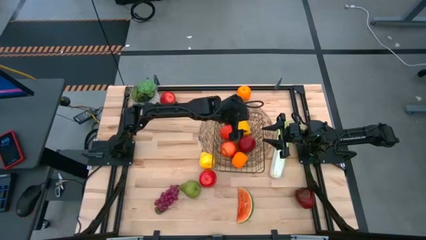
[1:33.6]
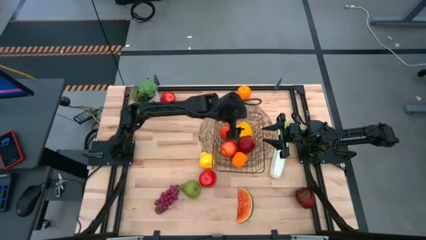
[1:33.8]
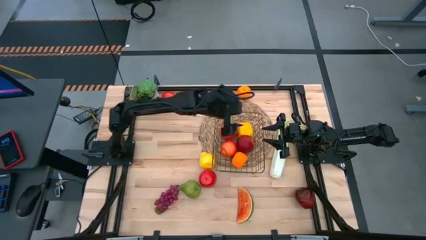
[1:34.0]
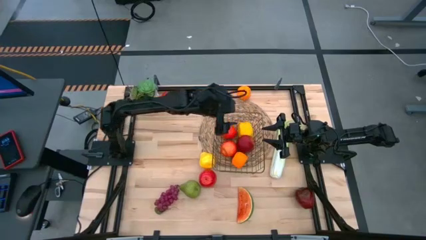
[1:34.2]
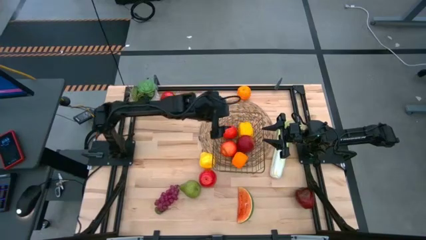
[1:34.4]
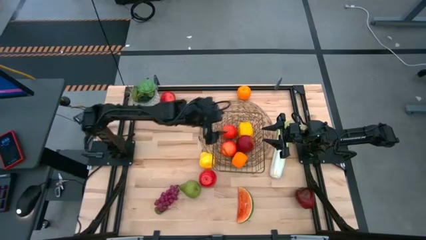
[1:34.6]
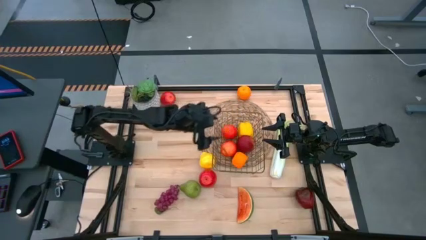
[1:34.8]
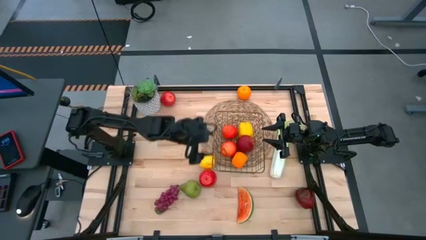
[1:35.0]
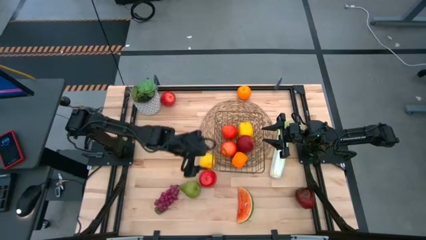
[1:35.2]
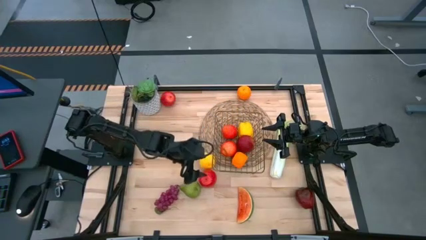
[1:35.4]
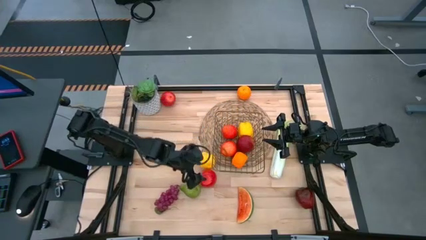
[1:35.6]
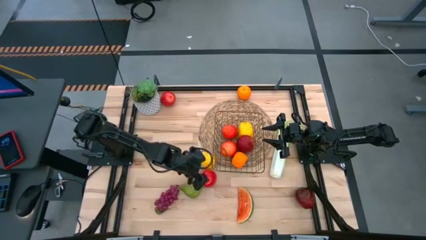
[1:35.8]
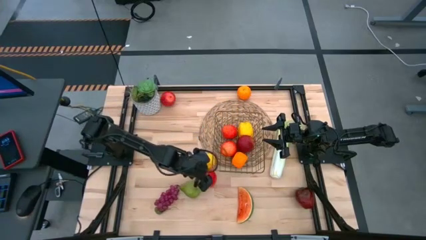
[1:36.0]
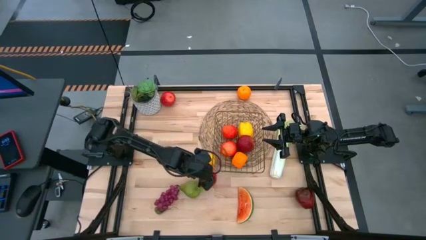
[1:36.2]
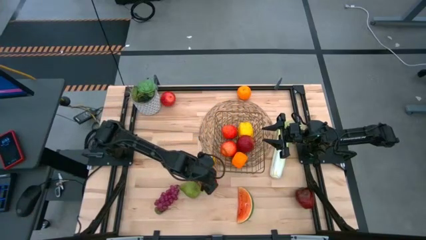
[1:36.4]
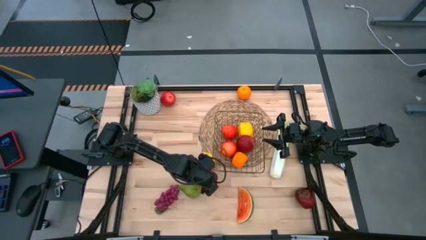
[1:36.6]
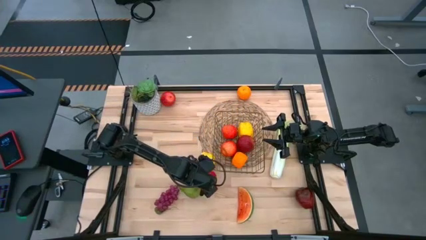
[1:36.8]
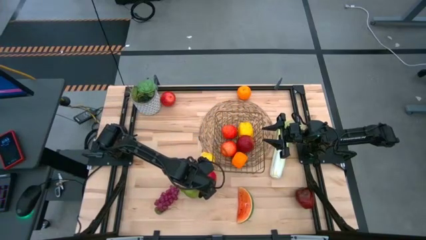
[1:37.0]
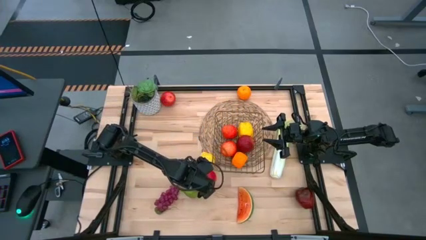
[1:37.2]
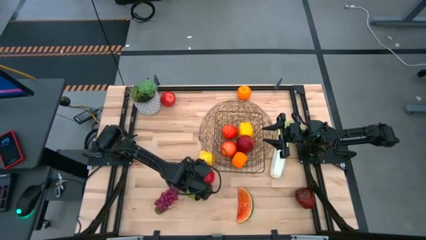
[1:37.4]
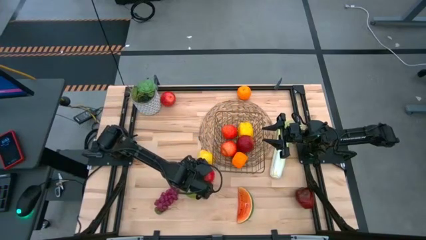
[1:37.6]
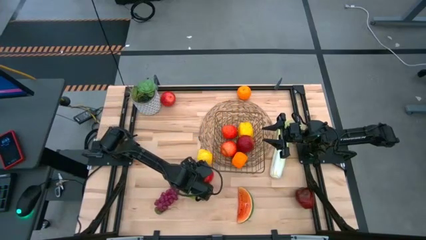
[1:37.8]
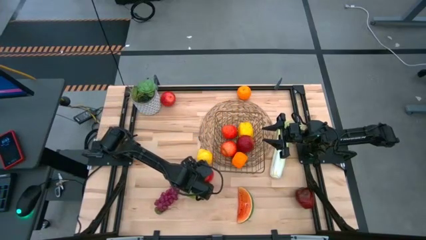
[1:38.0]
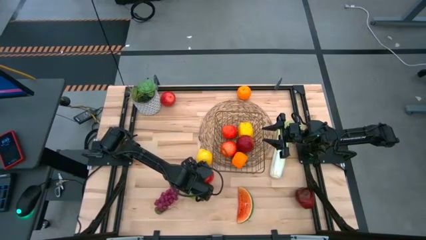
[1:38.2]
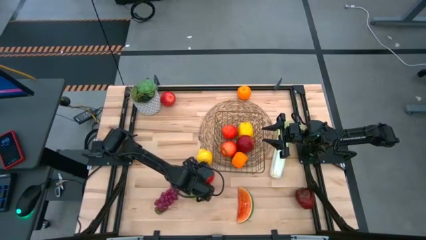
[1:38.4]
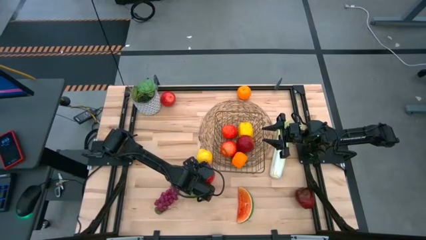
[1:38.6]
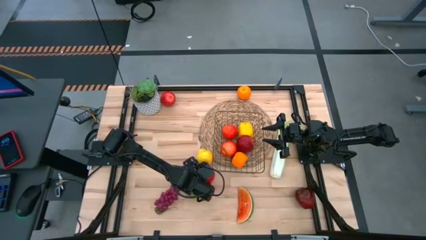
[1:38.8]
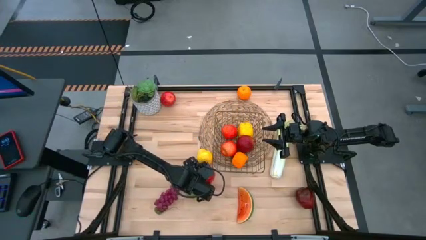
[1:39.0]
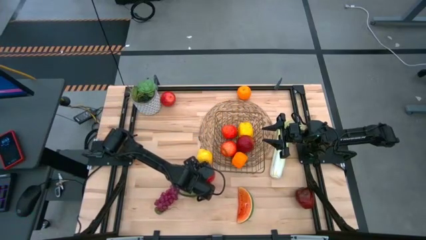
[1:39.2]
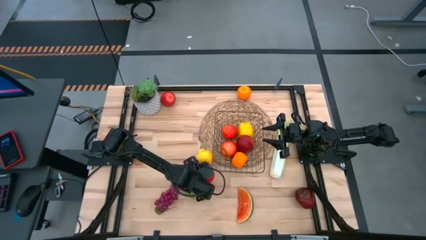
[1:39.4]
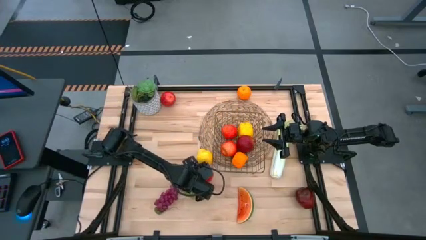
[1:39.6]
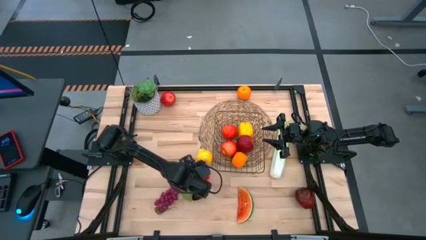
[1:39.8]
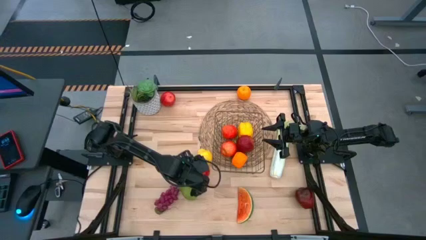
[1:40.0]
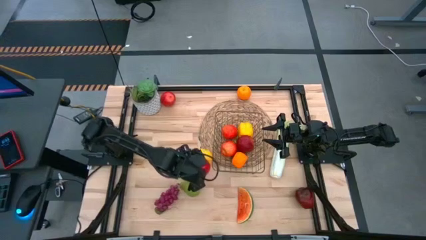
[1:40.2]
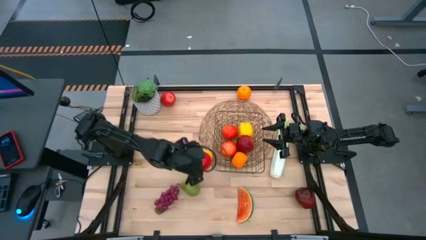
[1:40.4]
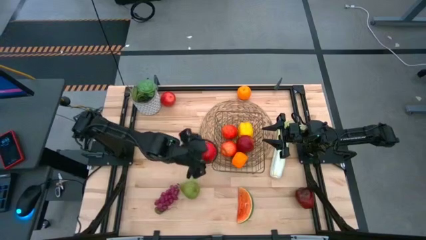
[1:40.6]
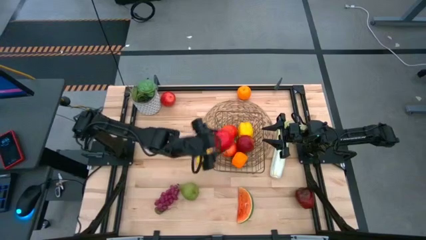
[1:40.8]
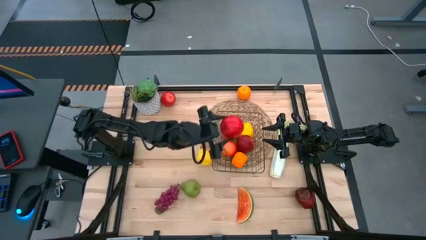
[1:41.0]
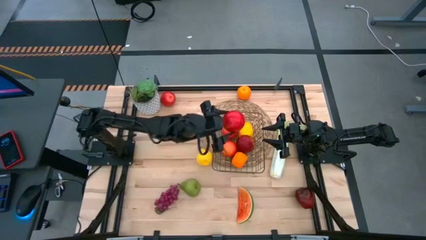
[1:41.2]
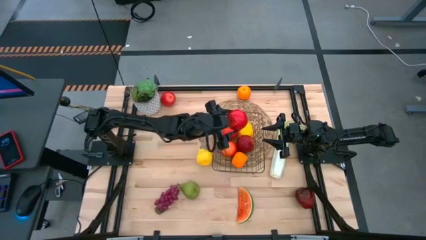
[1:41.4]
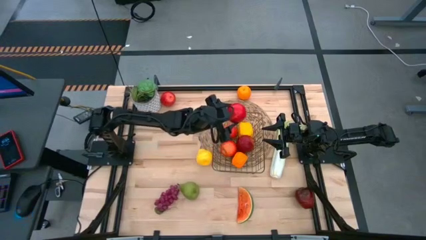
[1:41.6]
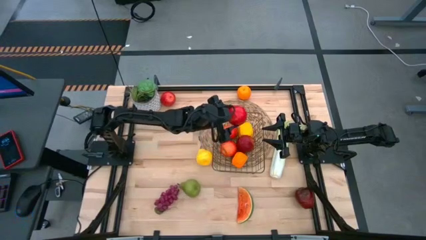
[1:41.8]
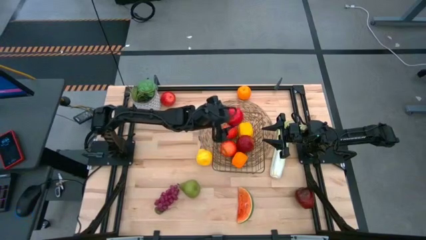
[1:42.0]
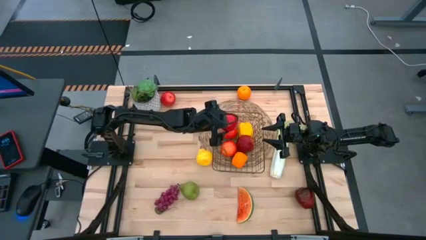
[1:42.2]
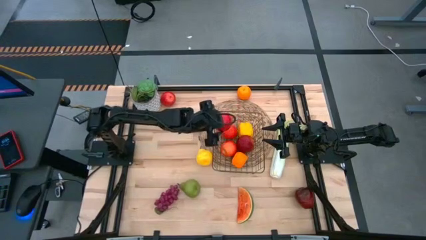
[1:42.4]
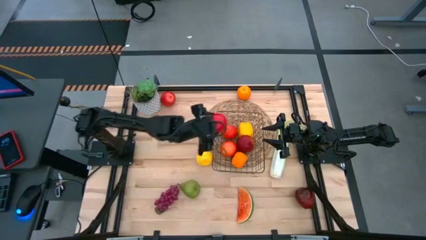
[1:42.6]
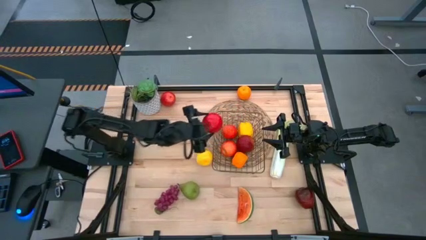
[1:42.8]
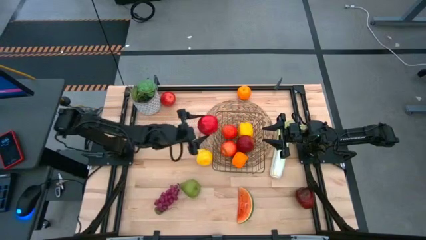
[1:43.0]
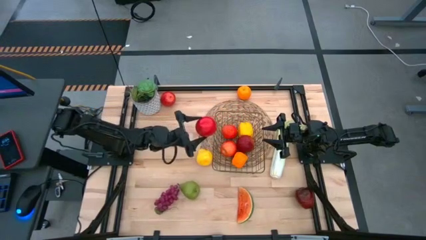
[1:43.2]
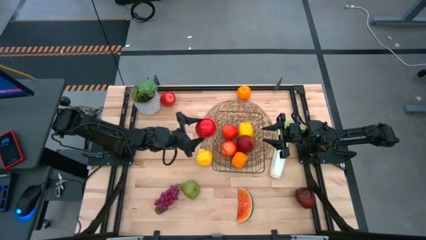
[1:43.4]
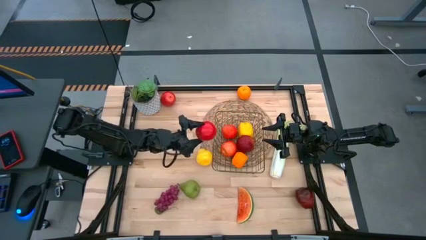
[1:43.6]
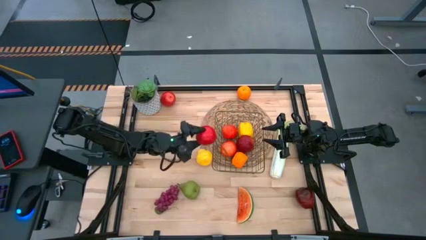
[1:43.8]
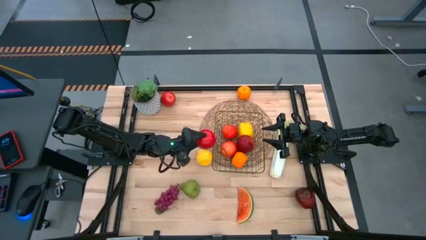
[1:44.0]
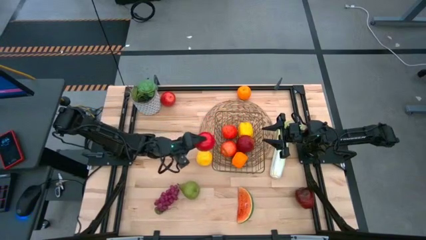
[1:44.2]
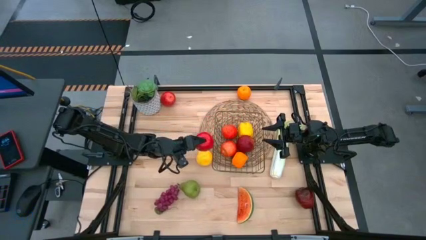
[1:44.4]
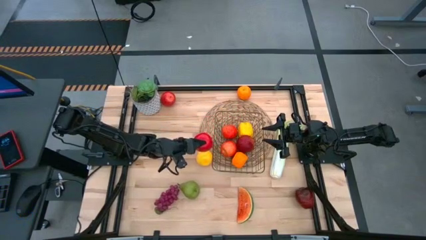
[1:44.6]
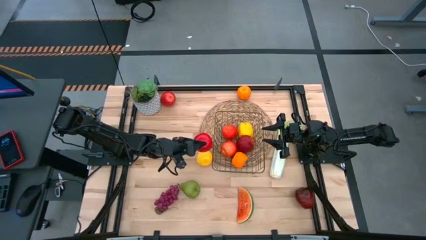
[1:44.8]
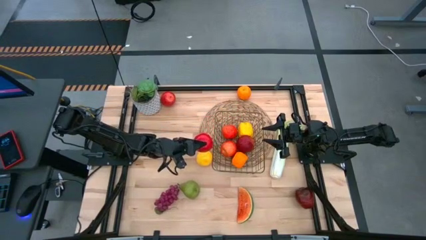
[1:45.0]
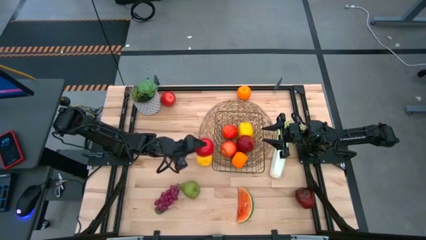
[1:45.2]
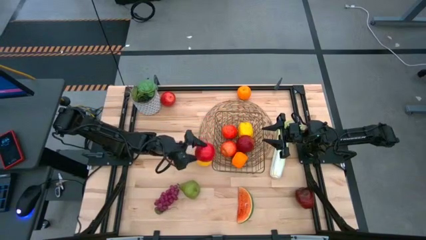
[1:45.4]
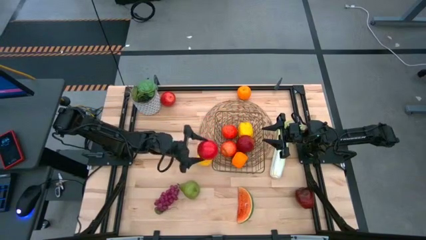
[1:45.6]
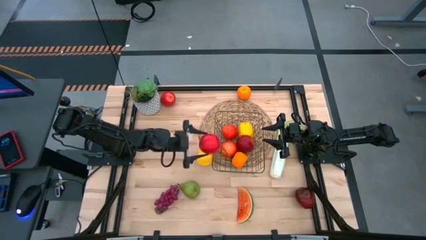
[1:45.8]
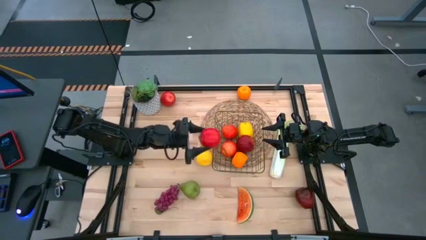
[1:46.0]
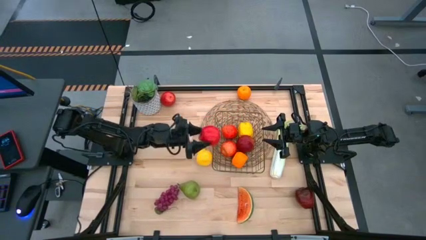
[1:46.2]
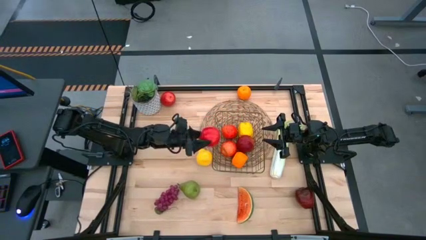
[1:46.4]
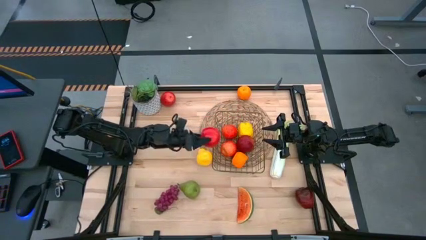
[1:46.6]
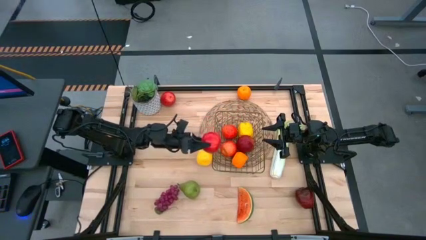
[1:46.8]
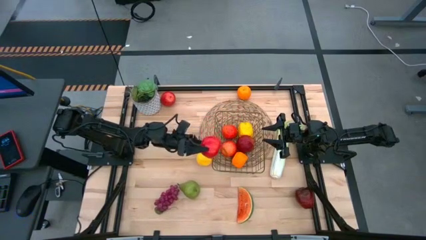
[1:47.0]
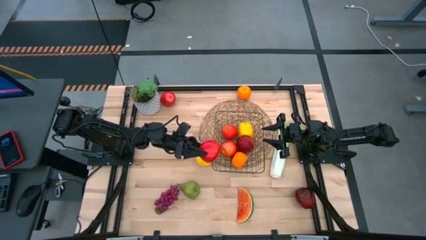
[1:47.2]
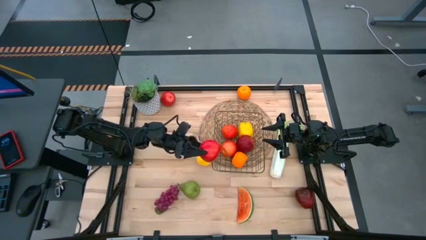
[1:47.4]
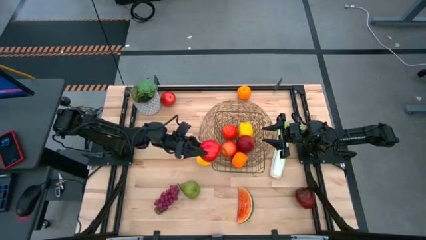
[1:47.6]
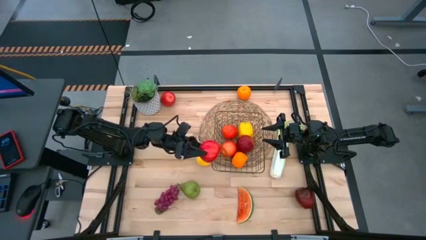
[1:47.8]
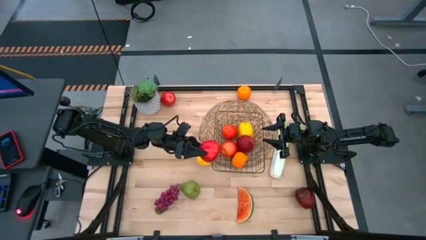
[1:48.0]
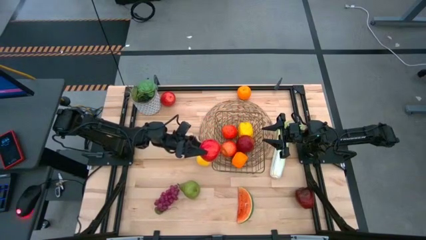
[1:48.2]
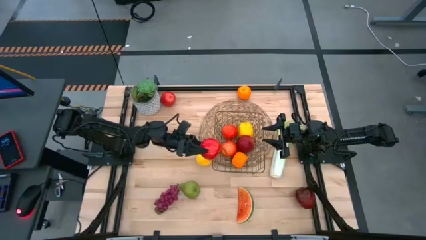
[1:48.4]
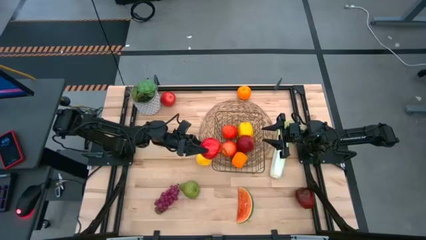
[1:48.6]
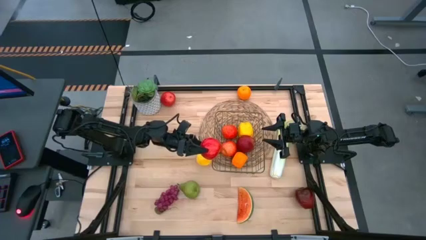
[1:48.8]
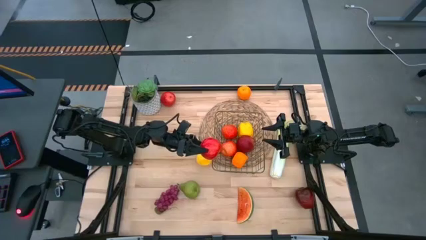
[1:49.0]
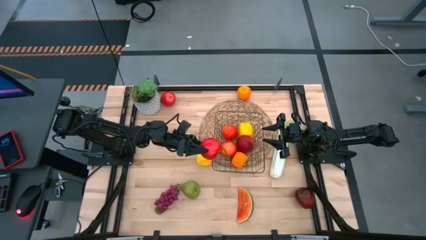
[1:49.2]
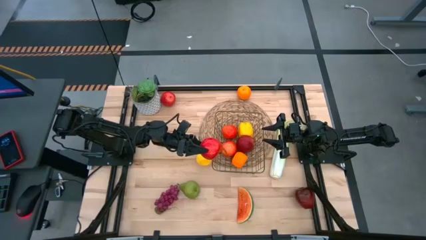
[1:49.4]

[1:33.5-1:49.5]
Task: Build produce basket
Put the bottom red apple into the wire basket
